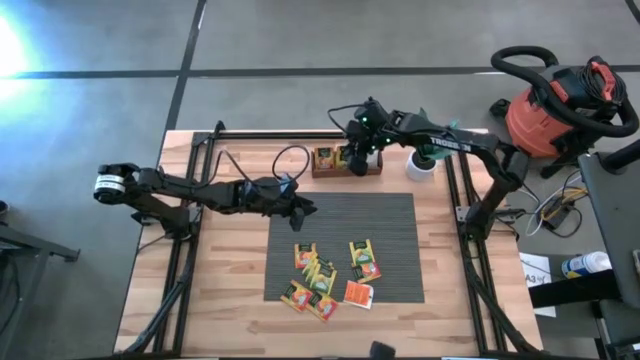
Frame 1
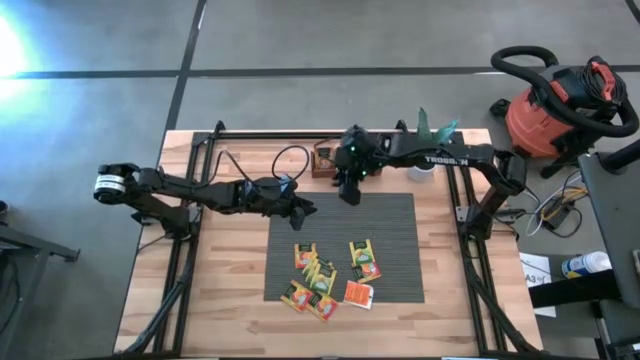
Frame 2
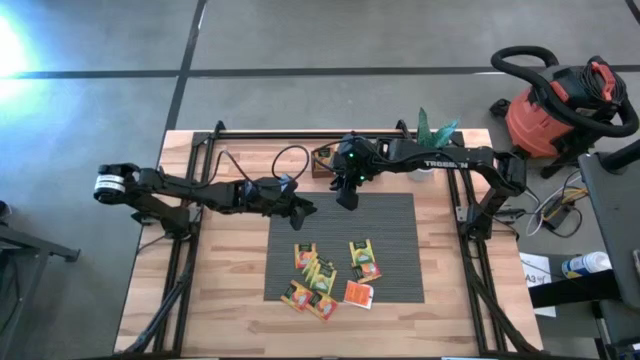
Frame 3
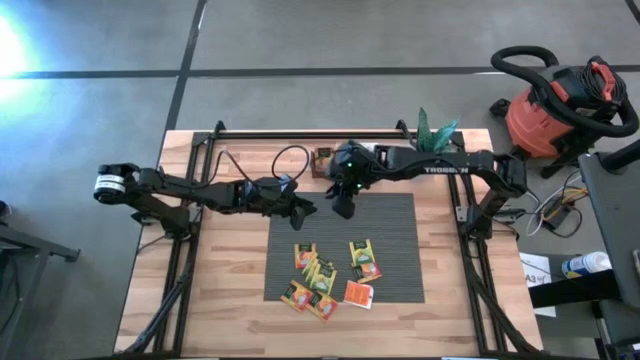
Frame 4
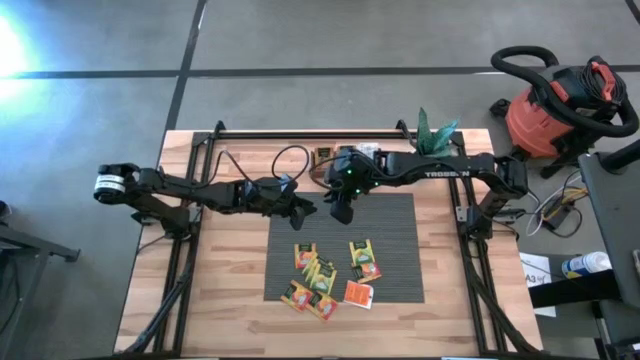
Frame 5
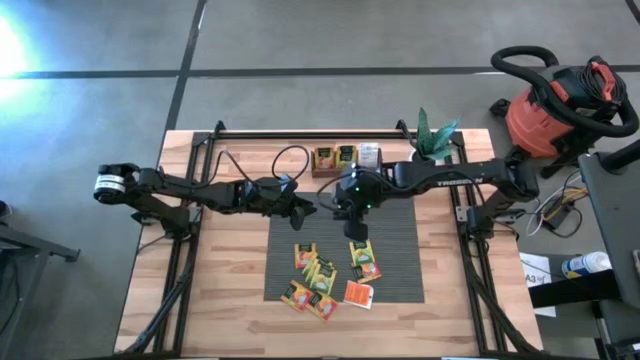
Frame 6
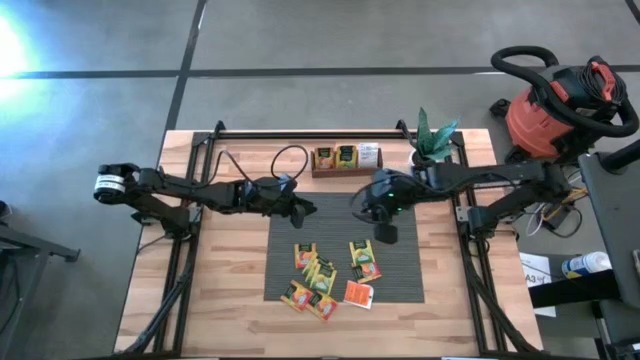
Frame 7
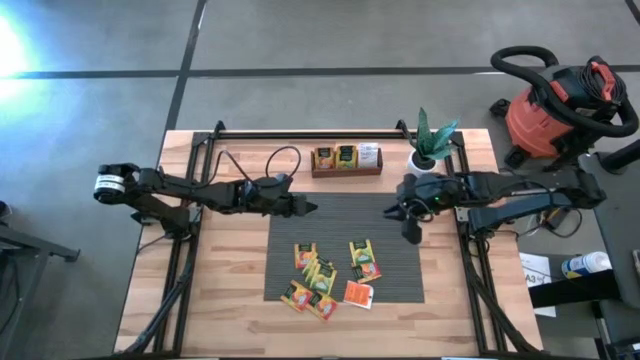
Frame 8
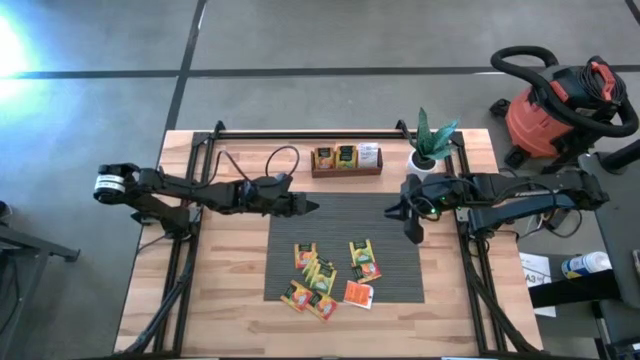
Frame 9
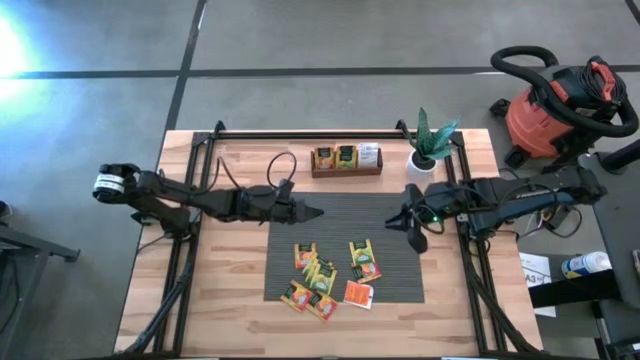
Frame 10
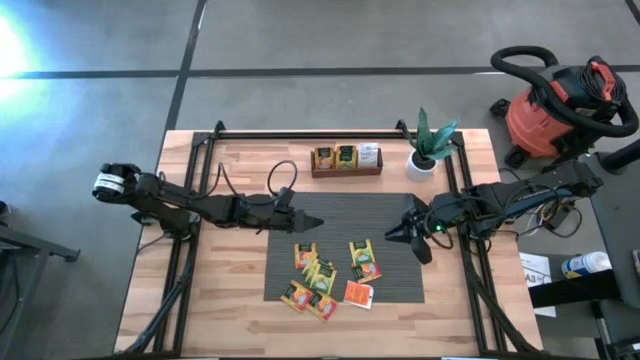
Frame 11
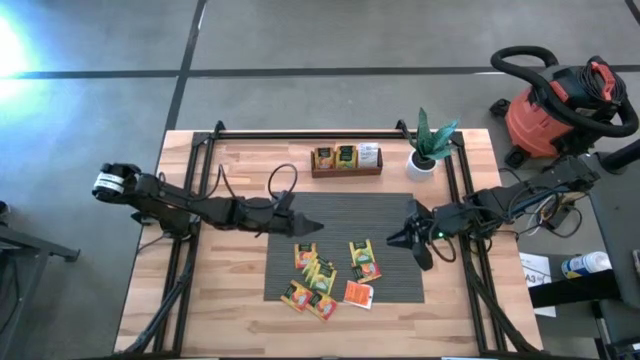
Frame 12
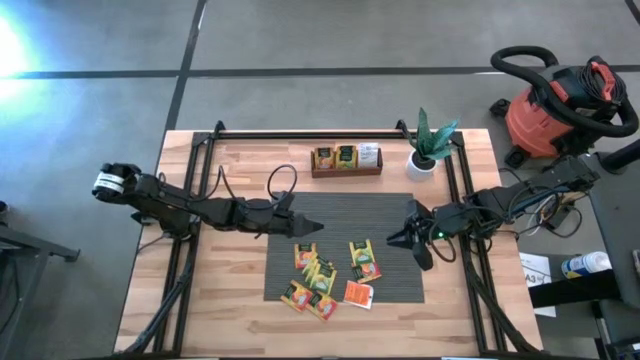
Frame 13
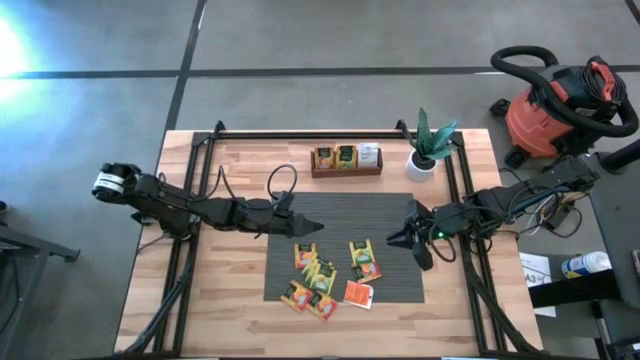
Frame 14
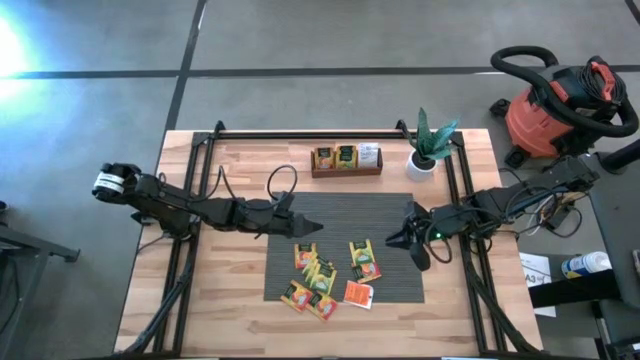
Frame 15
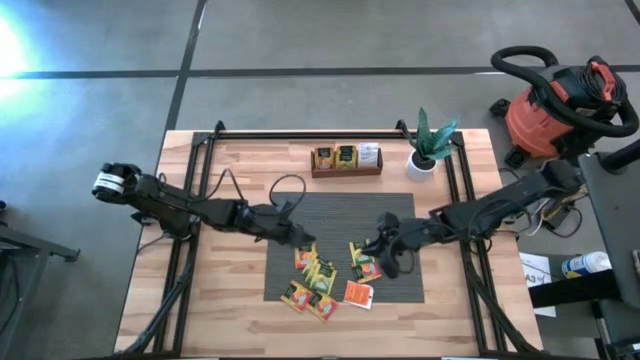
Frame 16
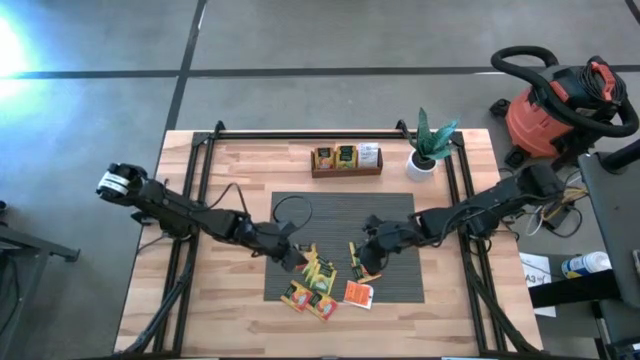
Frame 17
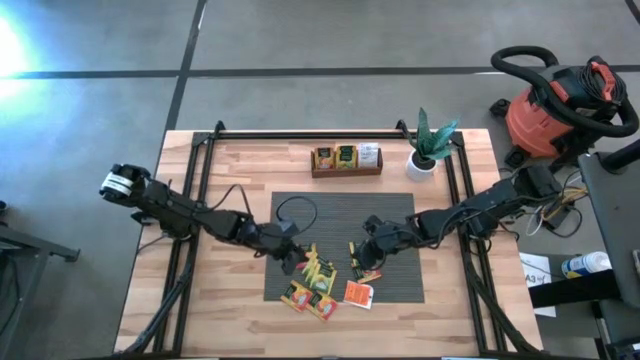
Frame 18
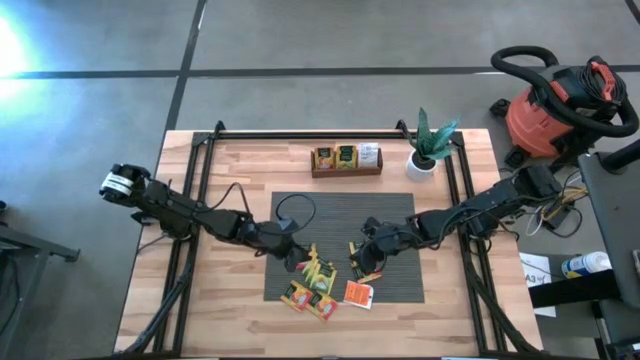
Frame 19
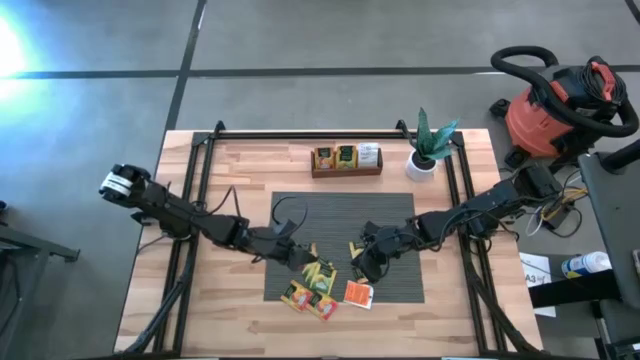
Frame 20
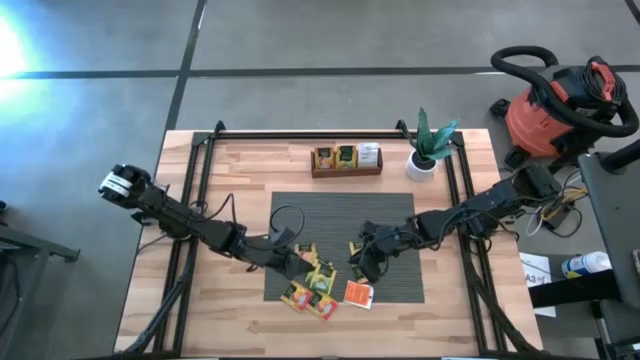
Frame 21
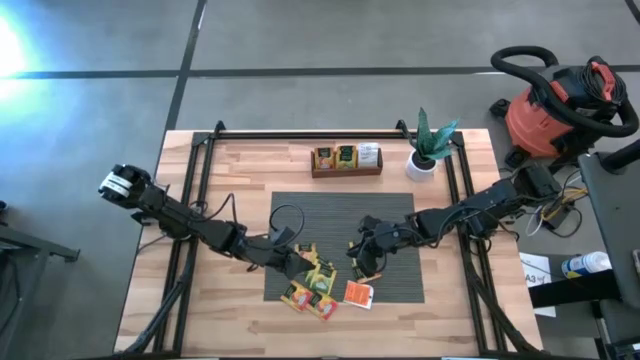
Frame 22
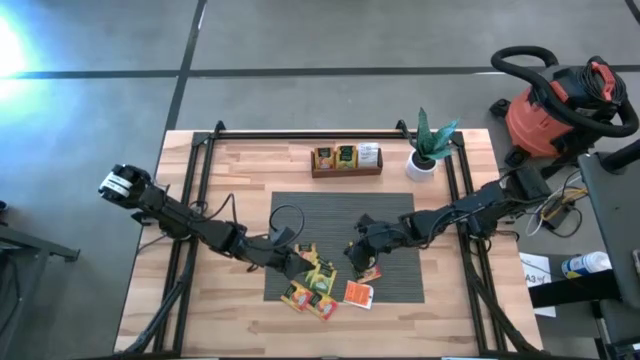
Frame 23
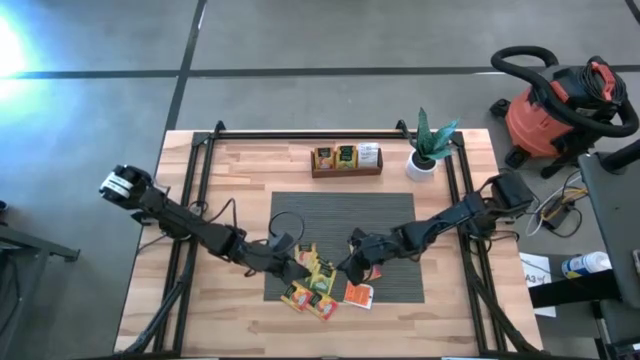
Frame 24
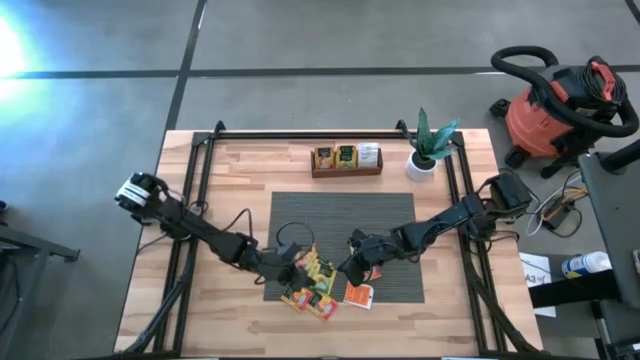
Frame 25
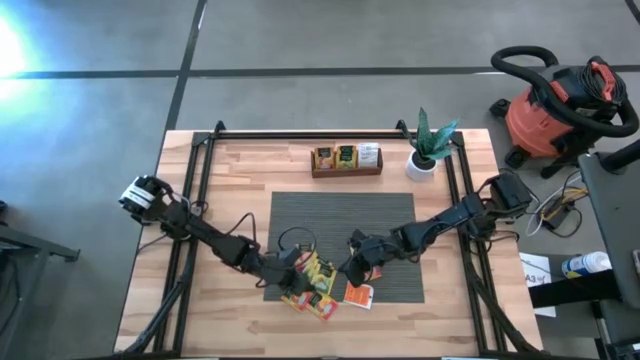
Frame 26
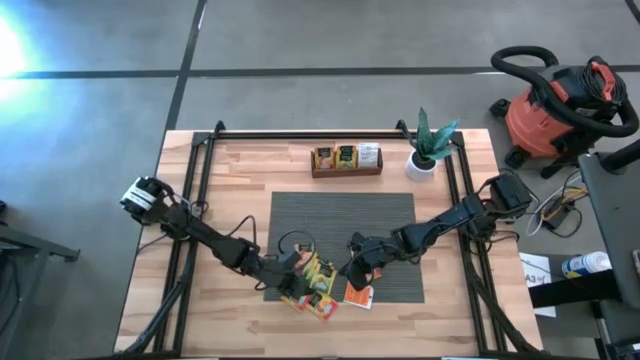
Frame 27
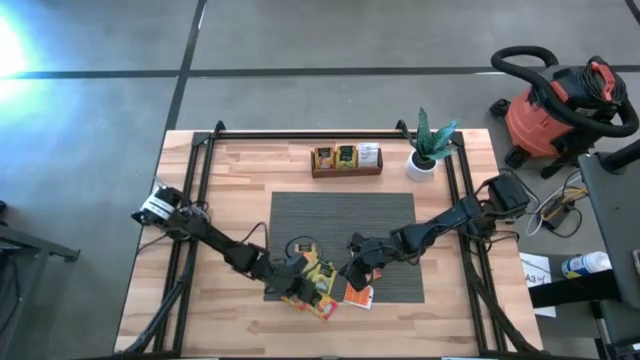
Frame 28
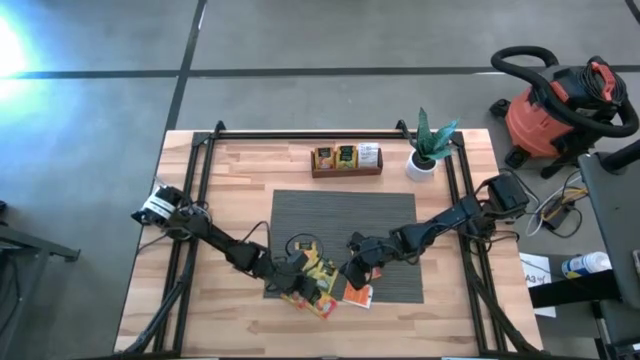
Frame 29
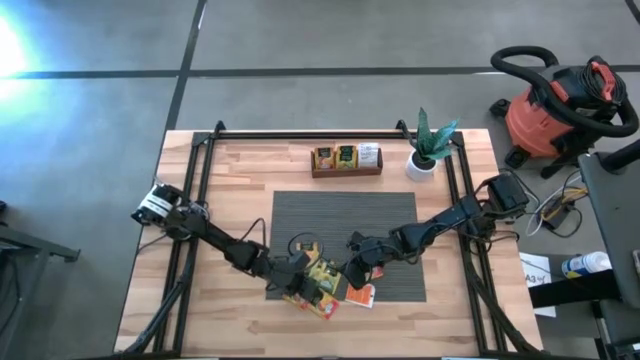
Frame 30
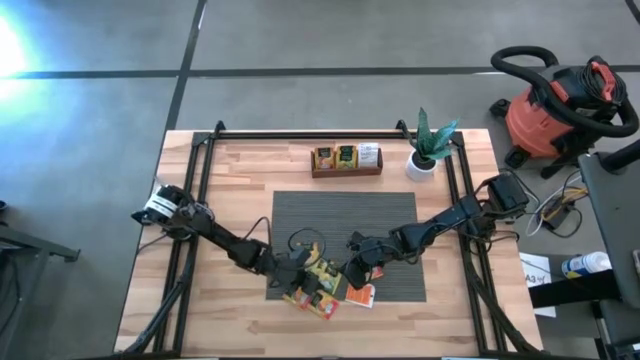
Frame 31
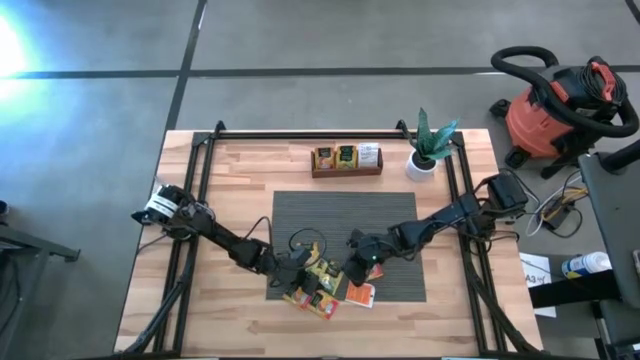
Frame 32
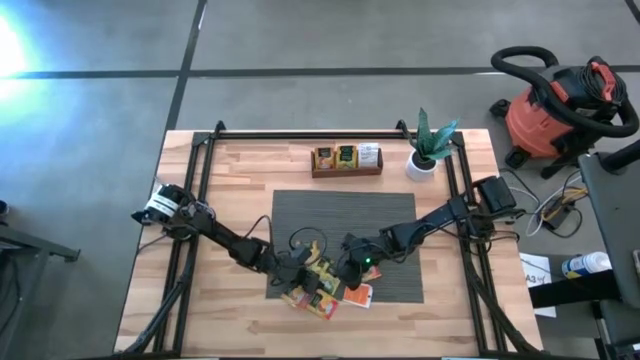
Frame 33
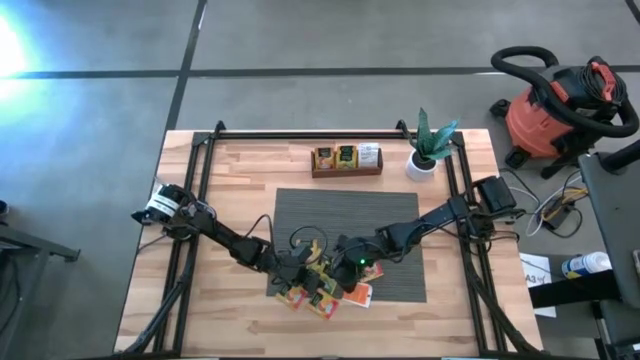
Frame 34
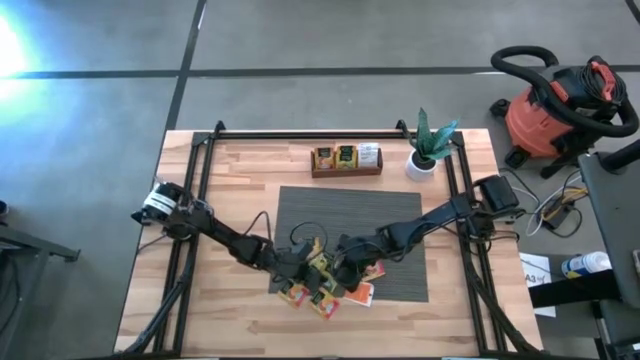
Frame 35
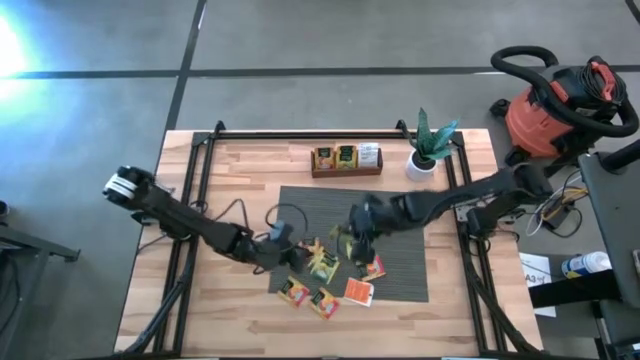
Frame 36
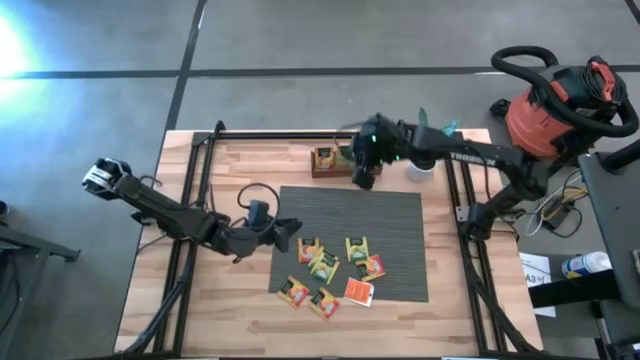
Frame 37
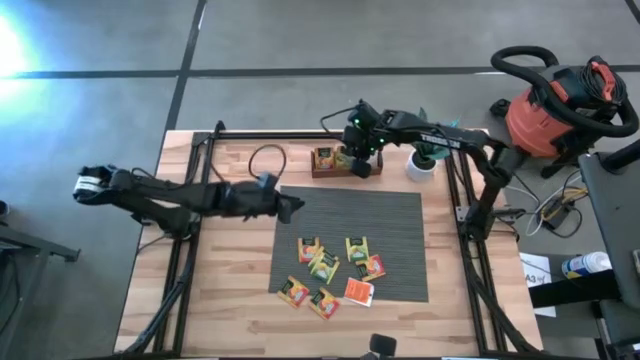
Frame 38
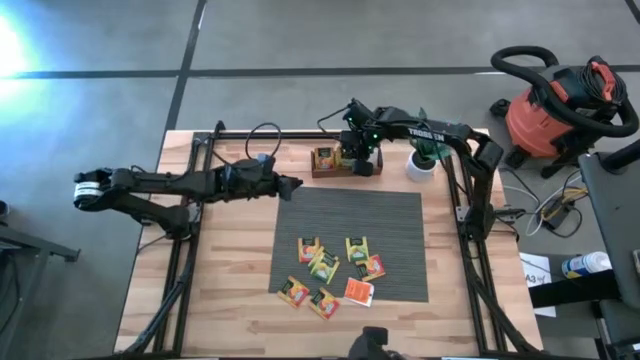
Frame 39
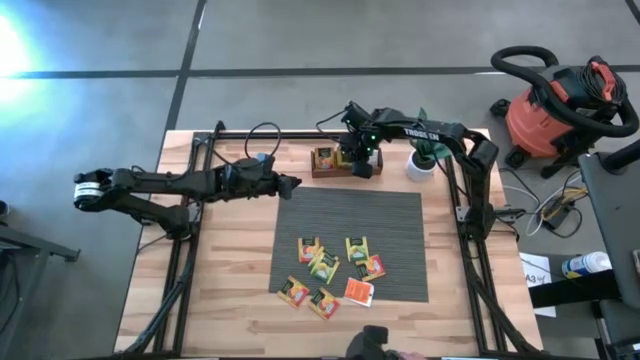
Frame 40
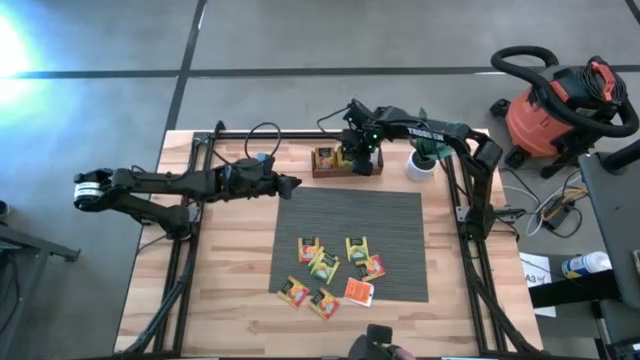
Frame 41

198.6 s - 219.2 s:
Task: Pick & Place Tea
Put the yellow tea bag into the middle section of the wooden organizer
